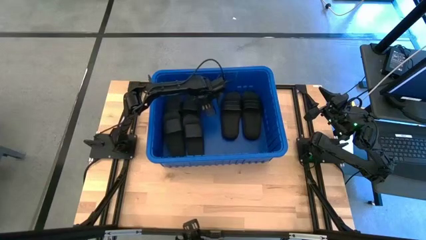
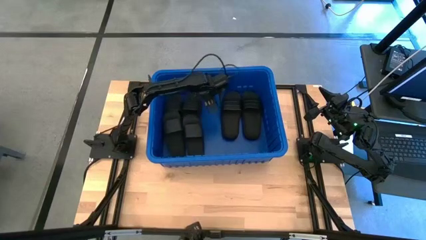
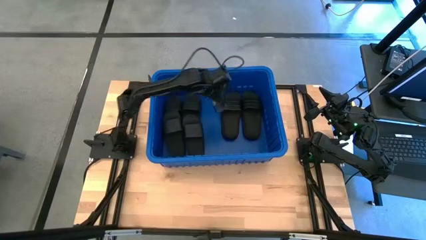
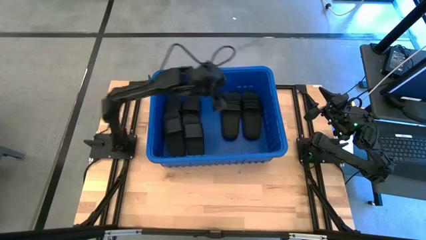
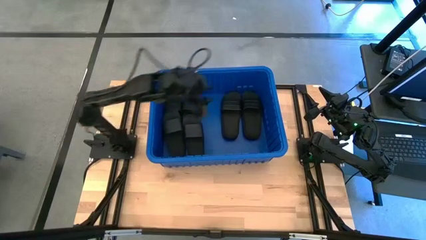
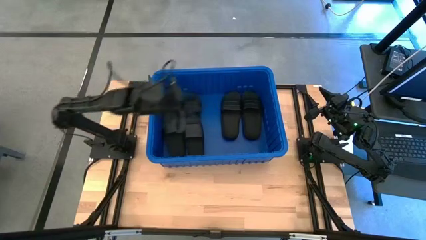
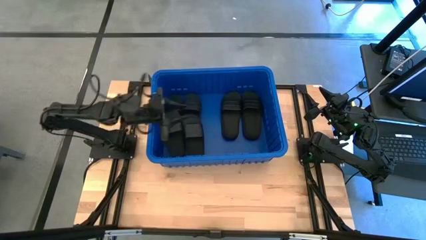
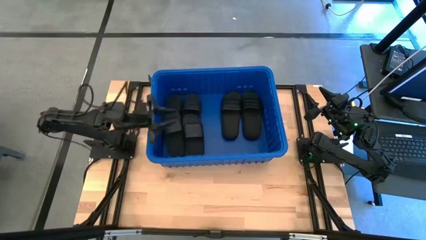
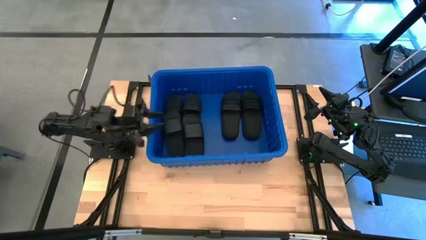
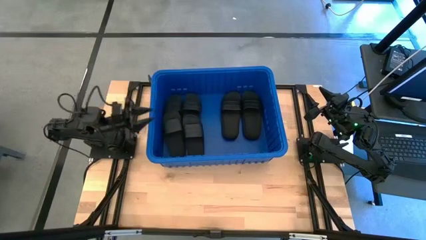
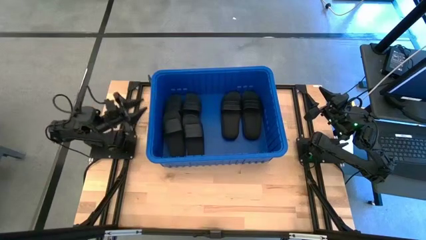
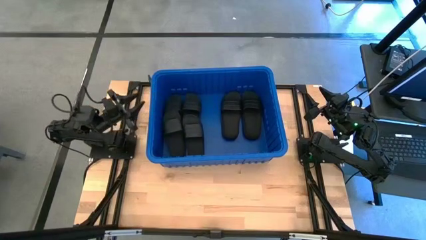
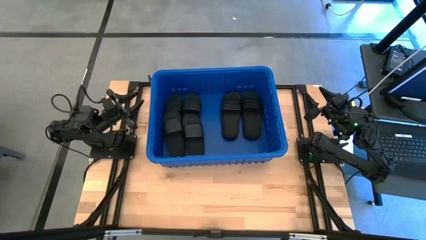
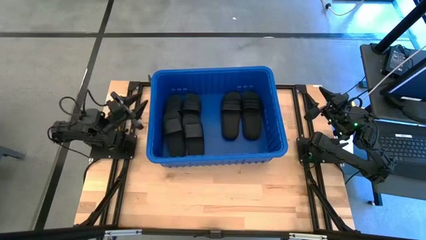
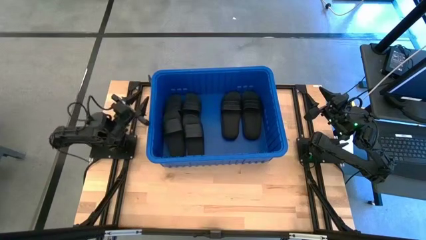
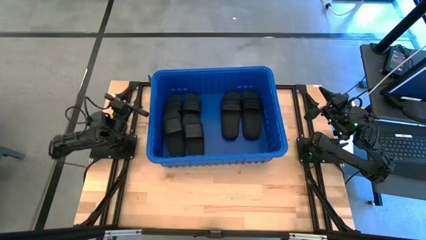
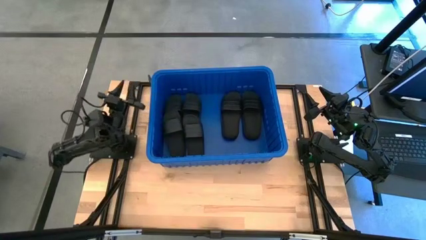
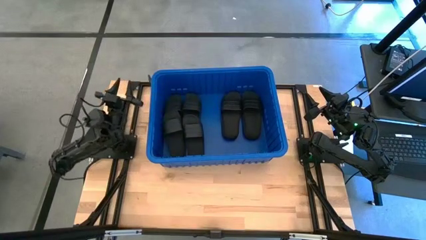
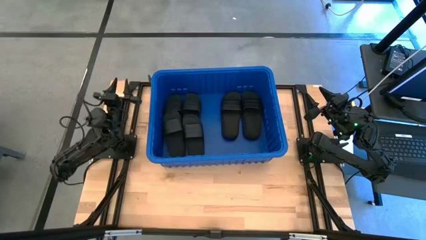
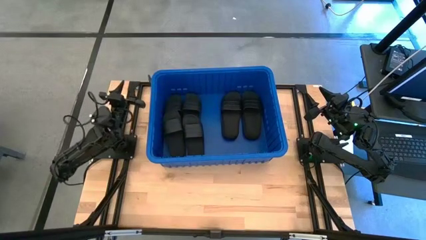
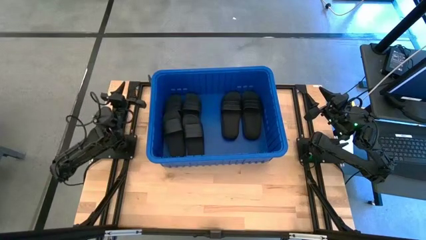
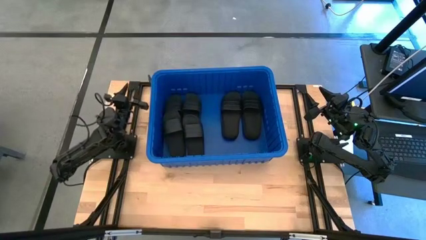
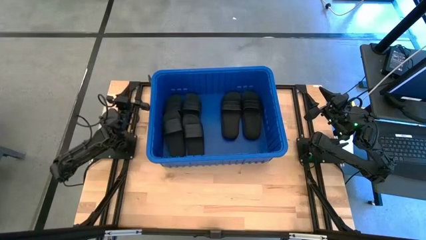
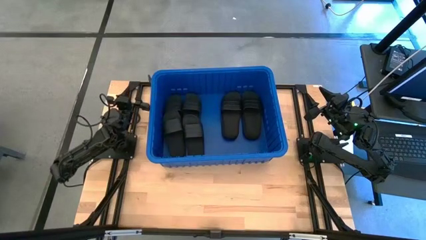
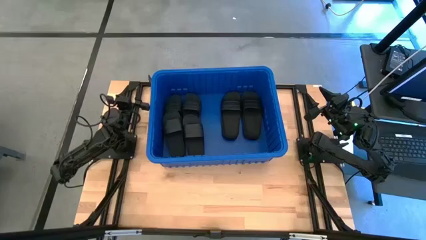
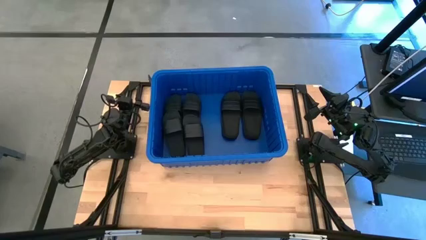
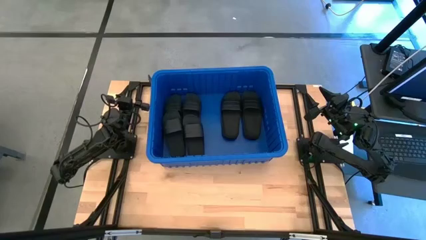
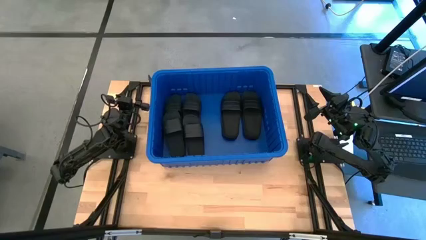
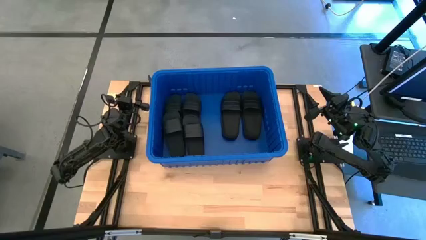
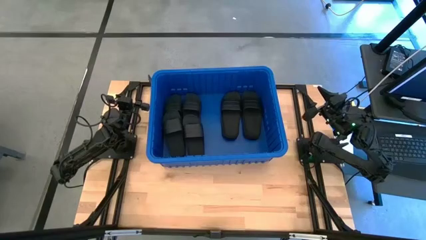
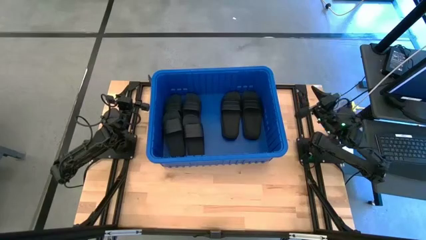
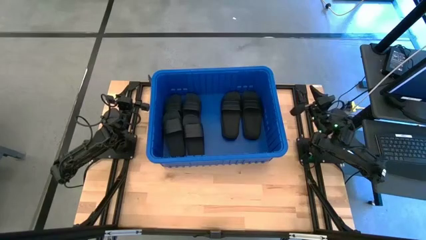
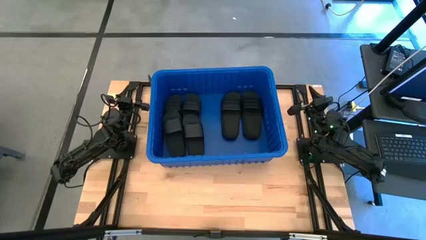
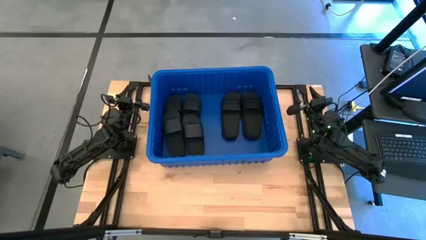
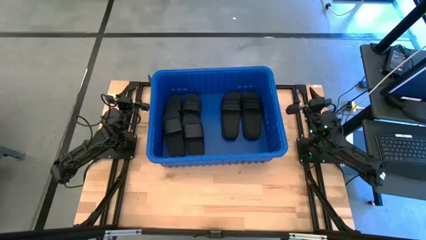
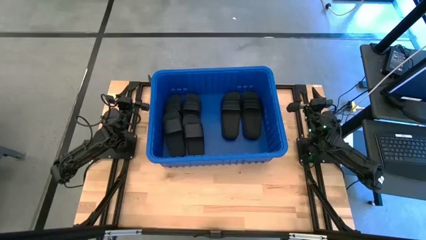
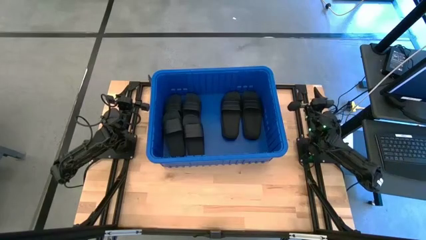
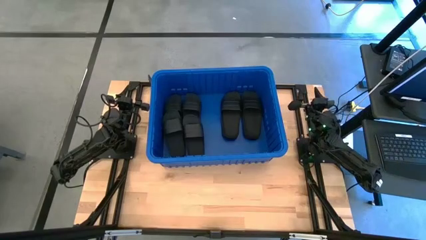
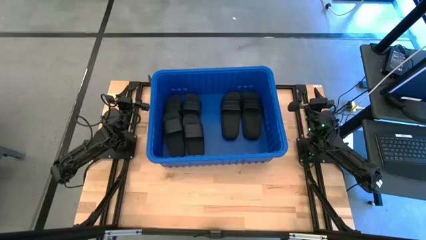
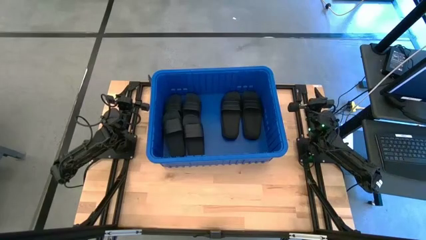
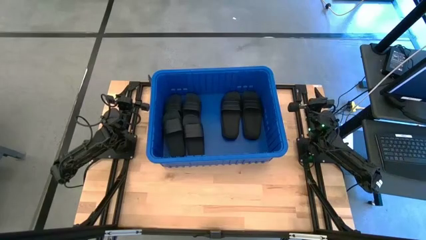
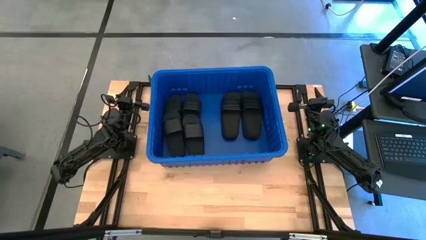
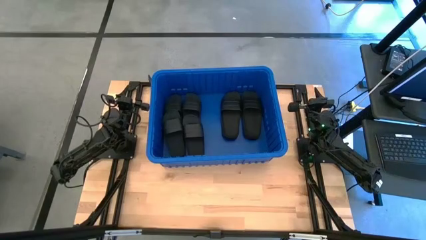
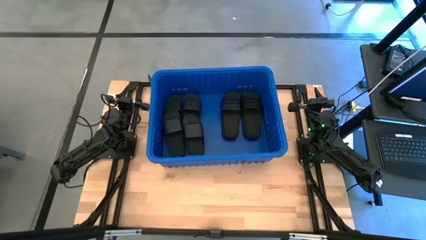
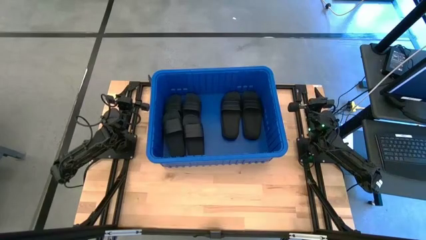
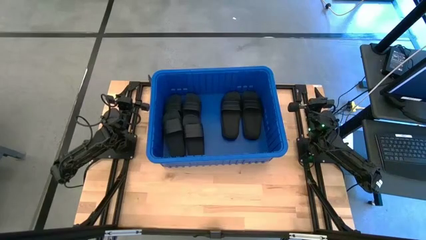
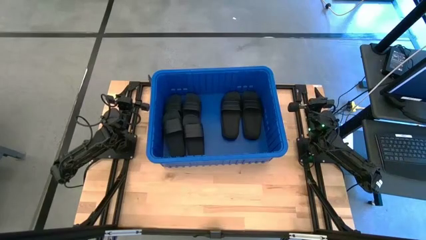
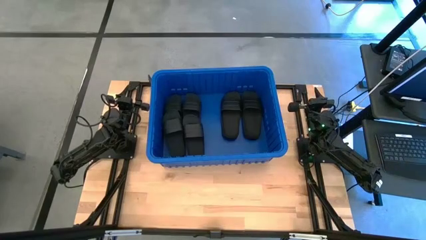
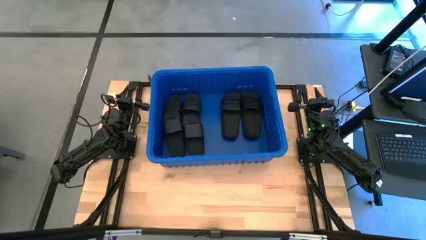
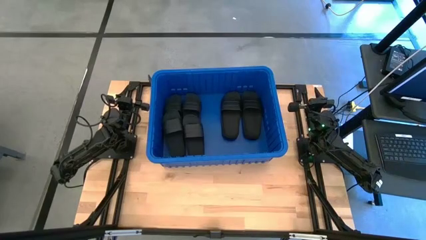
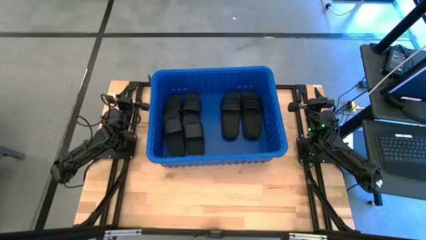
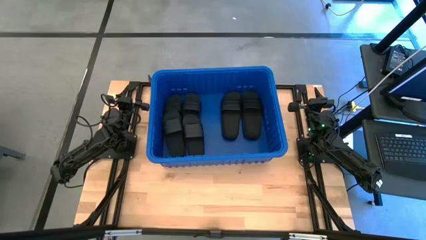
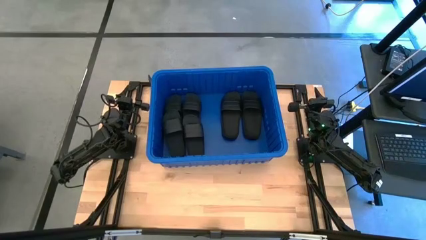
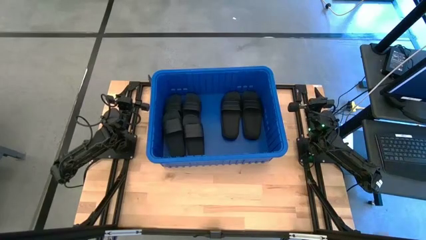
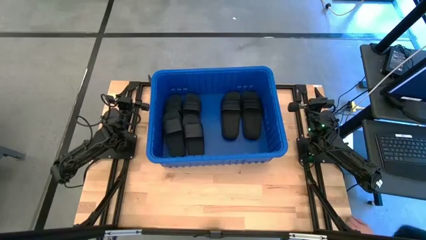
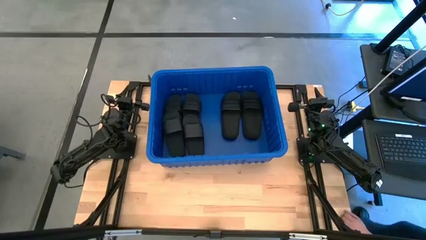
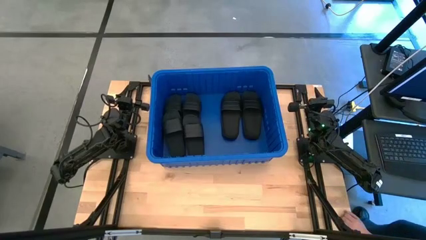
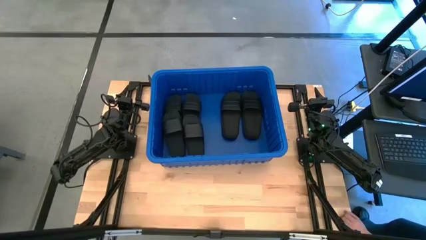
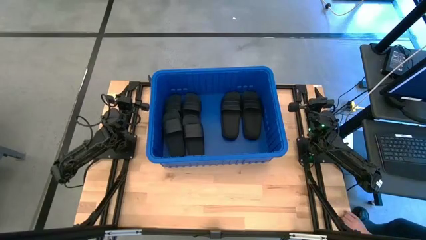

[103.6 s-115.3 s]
Task: Pick and place slides into bin
Return to Home Position
